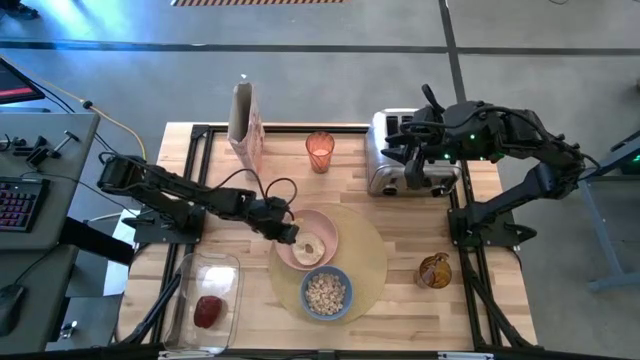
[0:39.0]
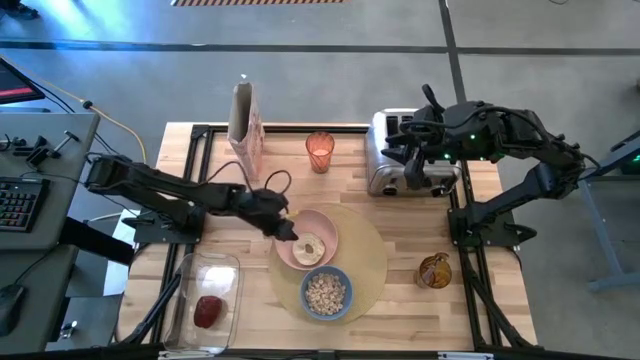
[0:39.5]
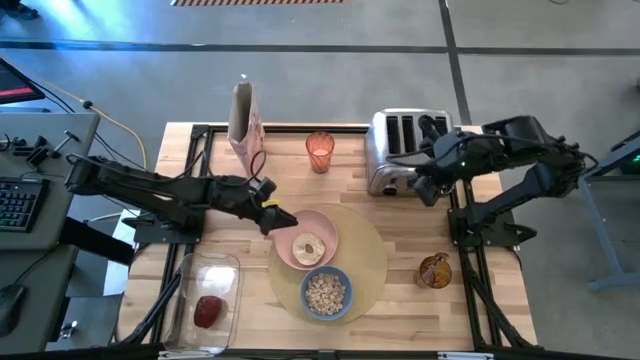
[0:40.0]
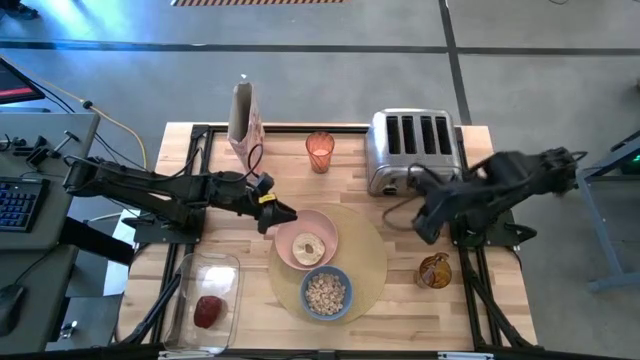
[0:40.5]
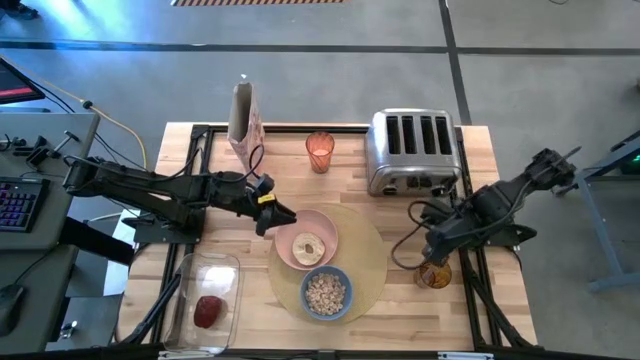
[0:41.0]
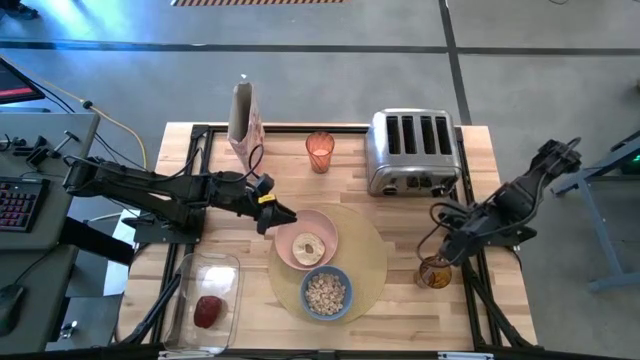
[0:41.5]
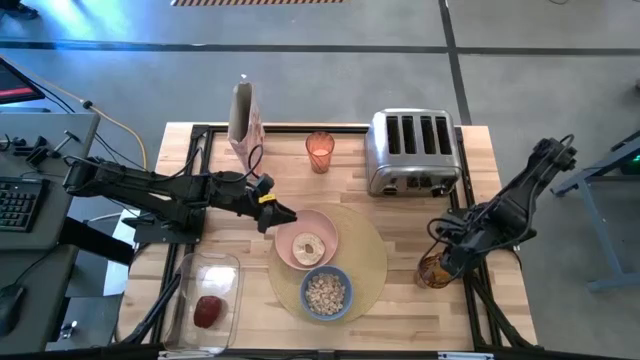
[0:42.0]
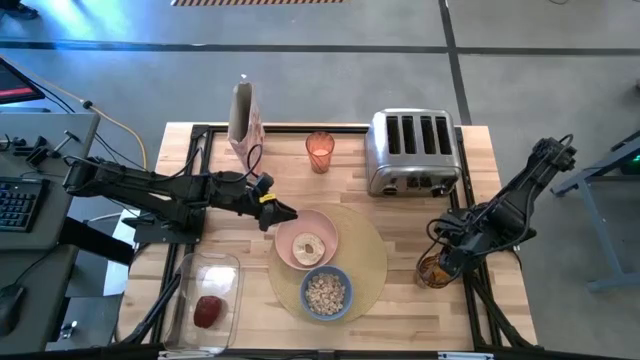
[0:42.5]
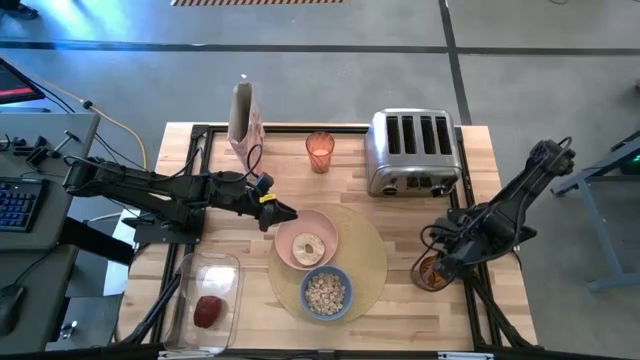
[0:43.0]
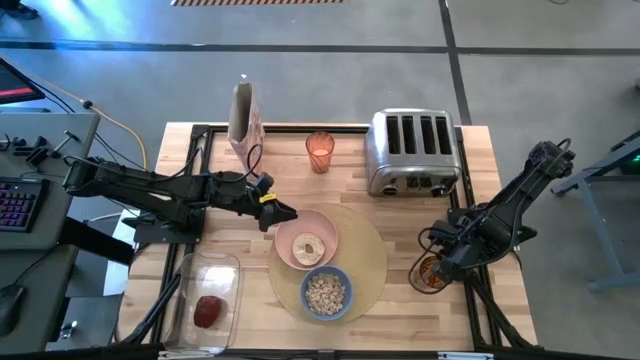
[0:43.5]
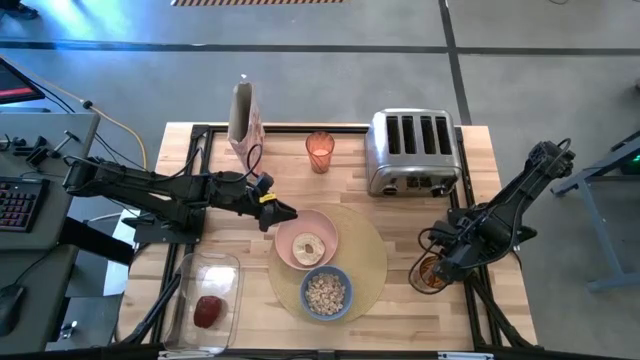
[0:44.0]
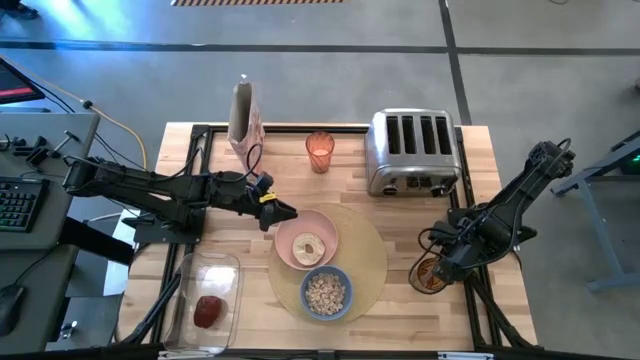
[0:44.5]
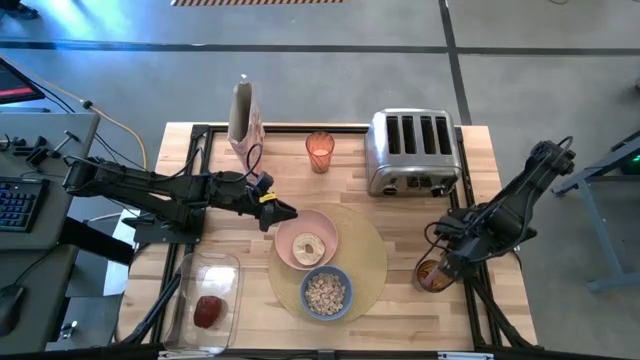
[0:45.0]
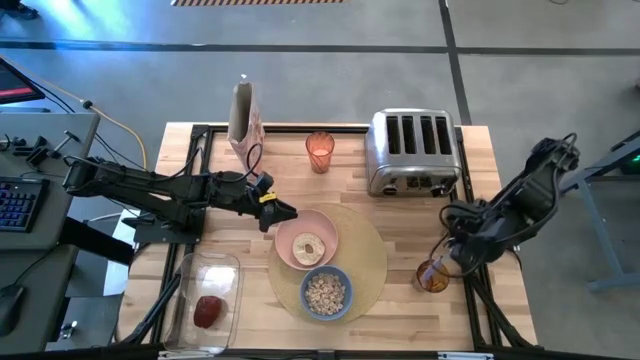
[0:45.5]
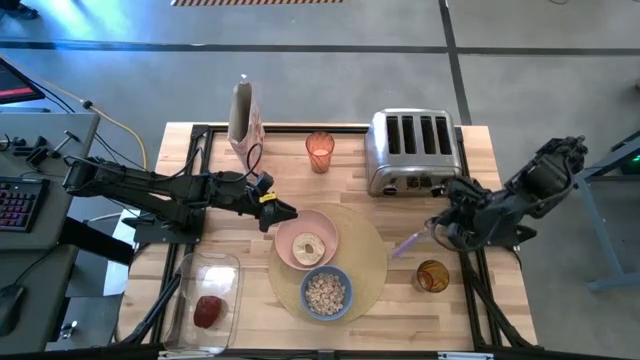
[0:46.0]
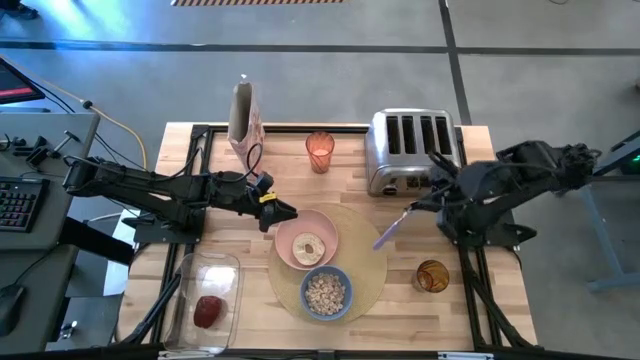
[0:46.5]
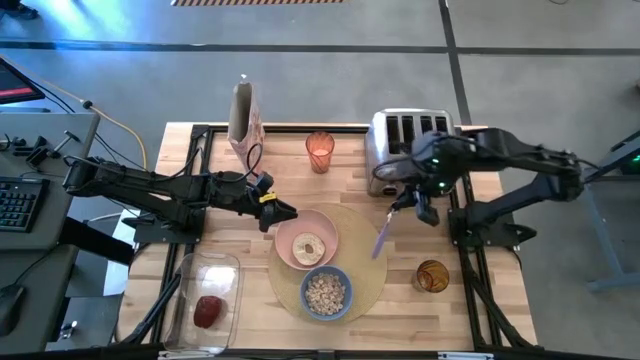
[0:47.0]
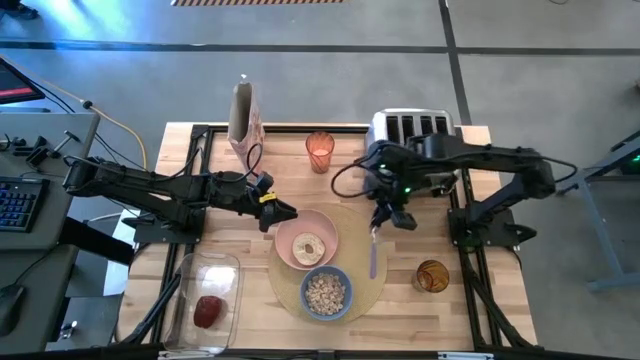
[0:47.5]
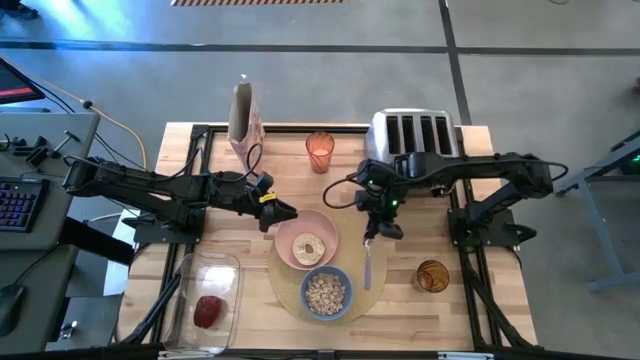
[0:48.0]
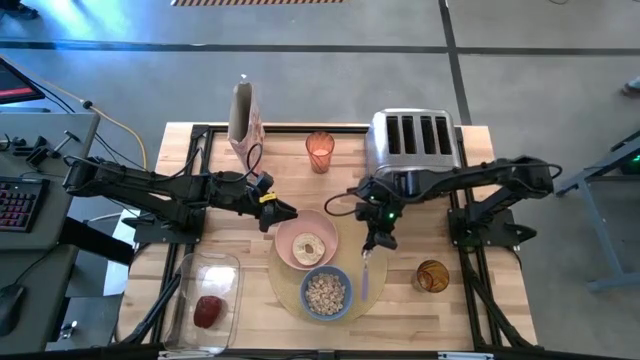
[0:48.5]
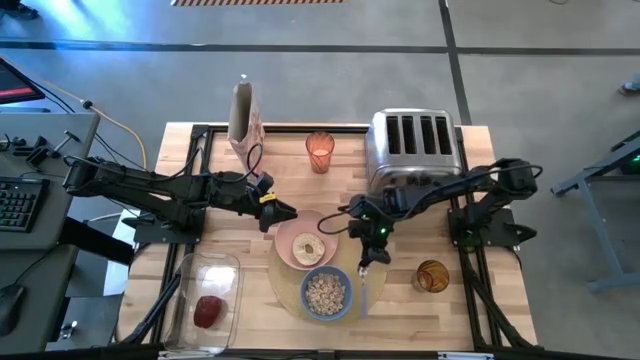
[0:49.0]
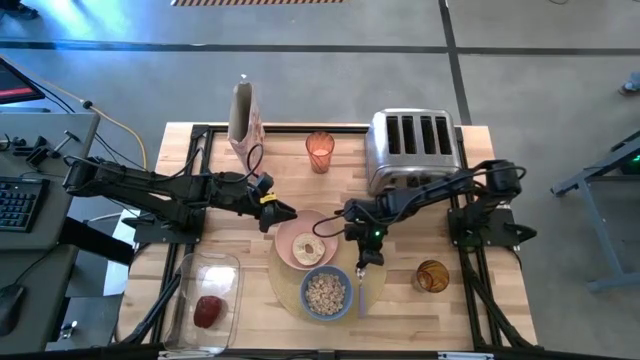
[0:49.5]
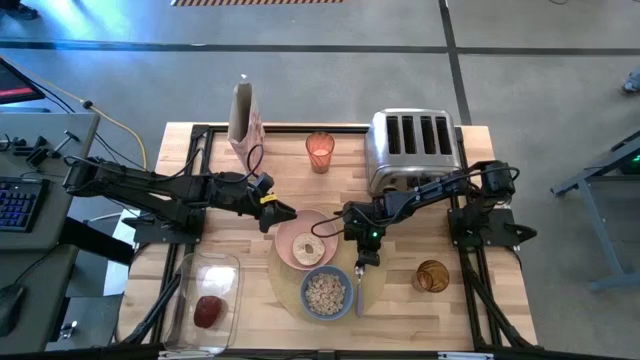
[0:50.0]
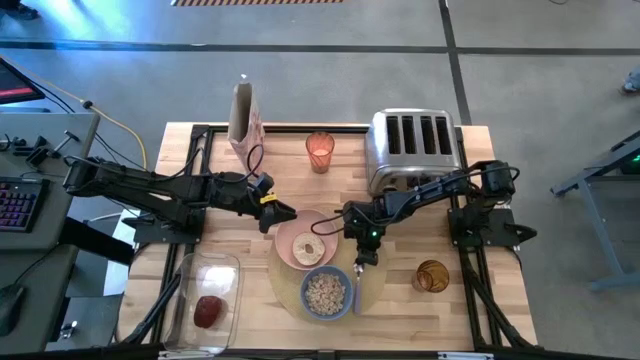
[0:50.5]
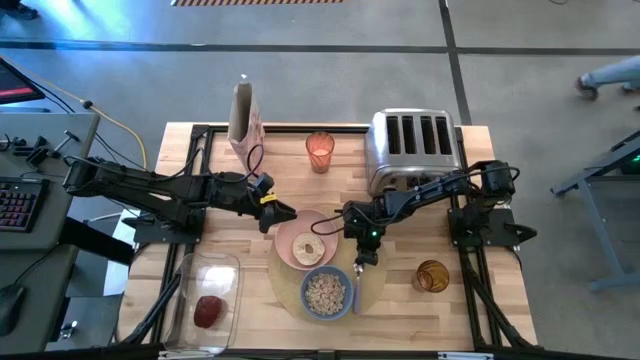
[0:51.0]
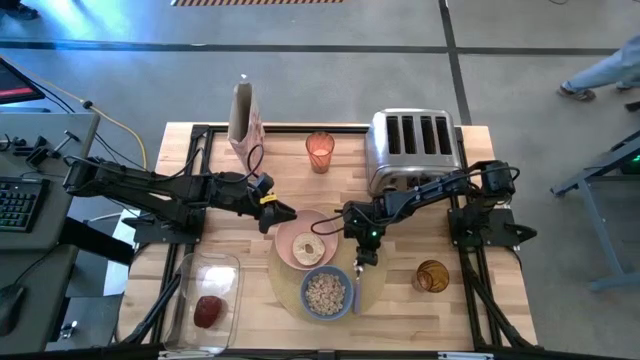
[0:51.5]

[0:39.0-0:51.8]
Task: Arrange a breakfast setting
Put the blue spoon onto the brown placemat to the right of the blue bowl

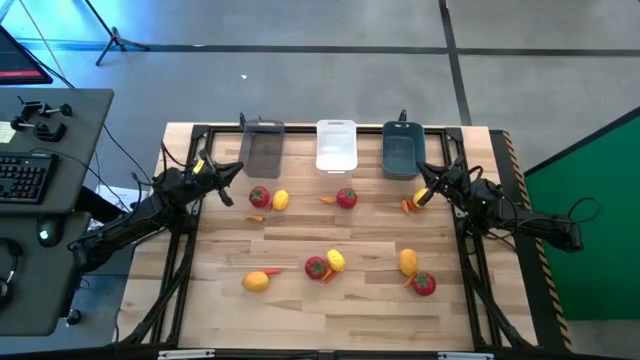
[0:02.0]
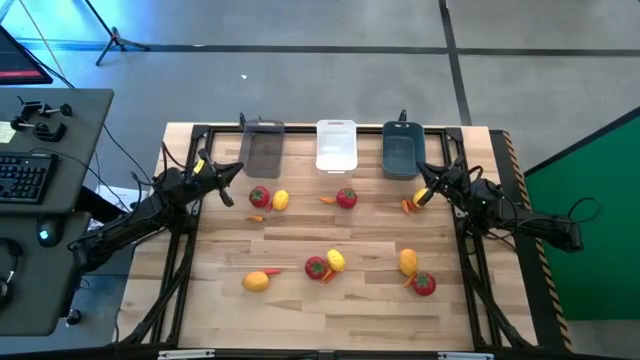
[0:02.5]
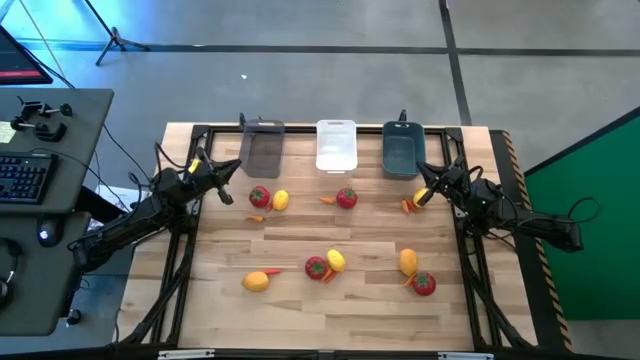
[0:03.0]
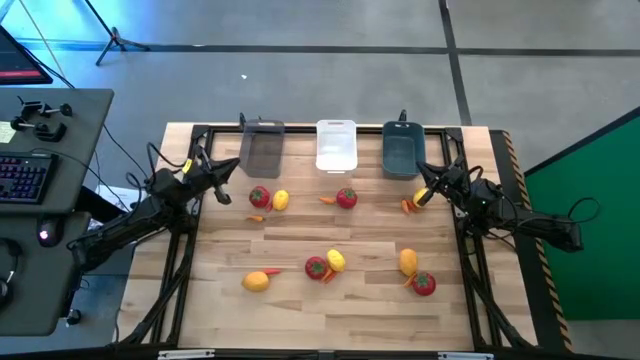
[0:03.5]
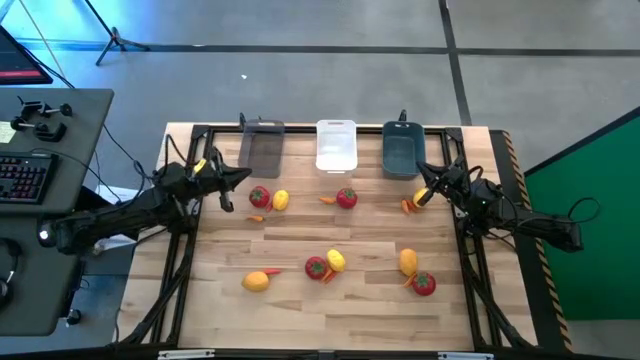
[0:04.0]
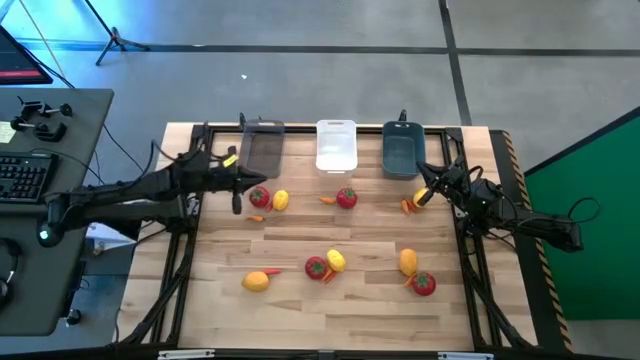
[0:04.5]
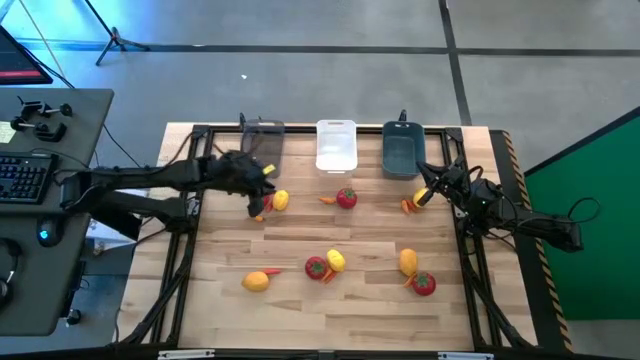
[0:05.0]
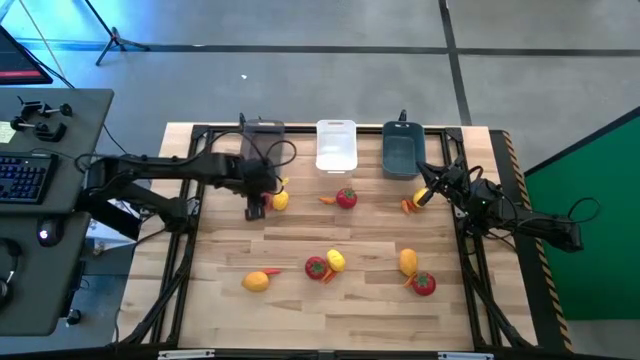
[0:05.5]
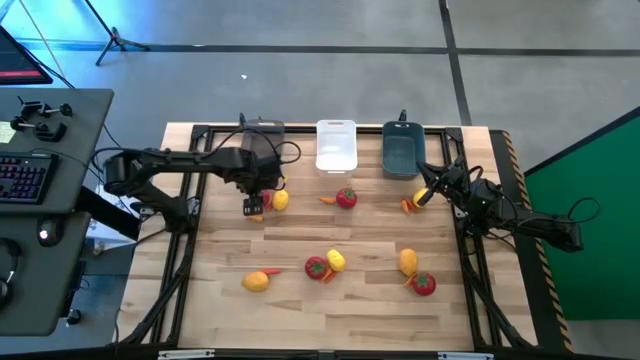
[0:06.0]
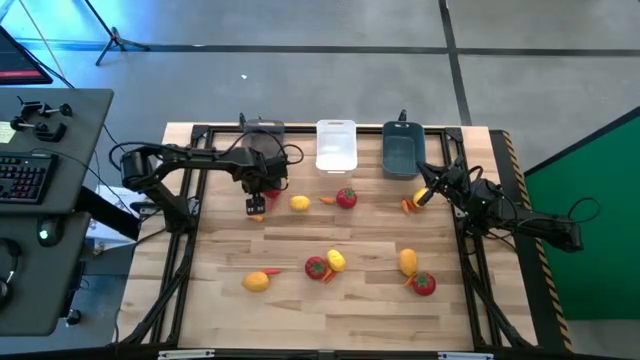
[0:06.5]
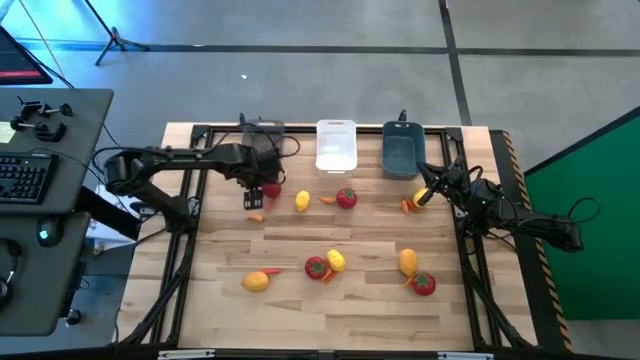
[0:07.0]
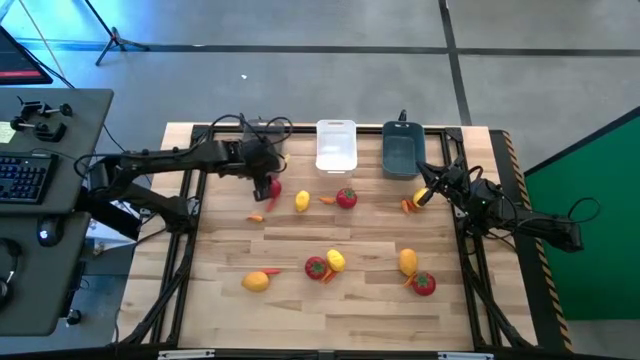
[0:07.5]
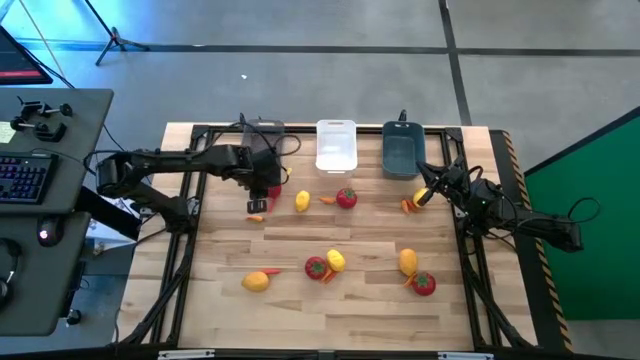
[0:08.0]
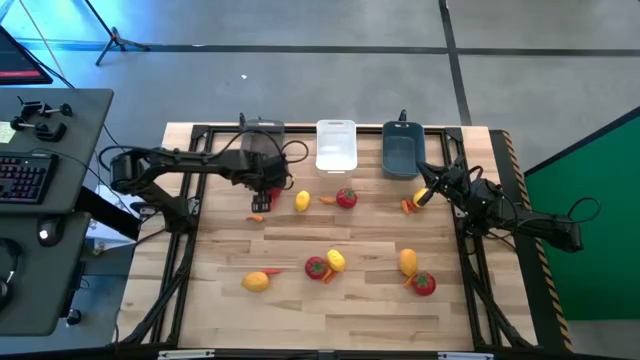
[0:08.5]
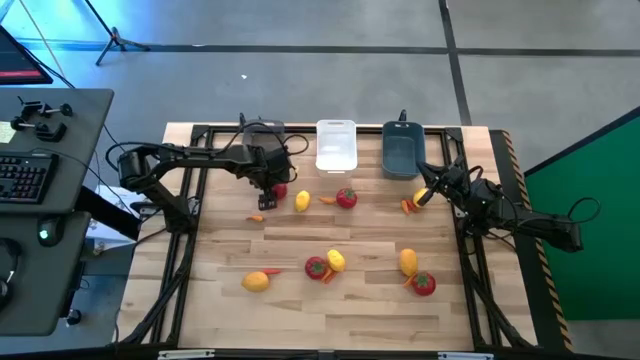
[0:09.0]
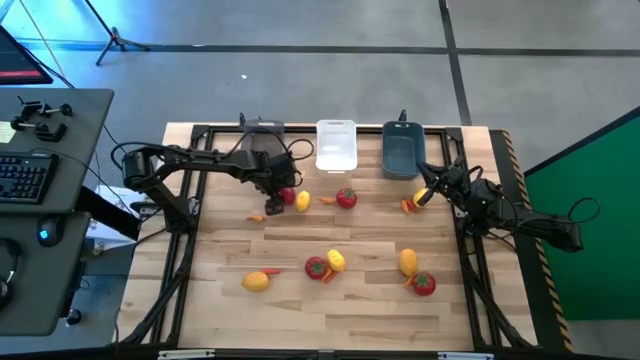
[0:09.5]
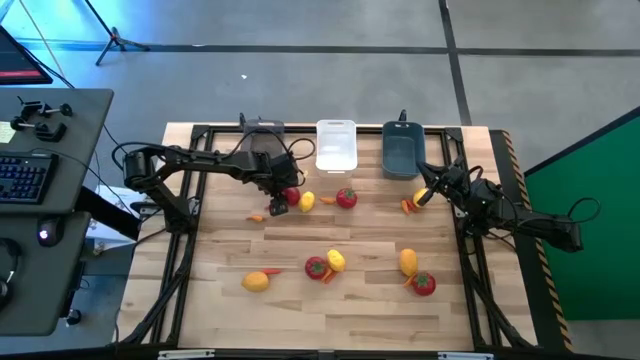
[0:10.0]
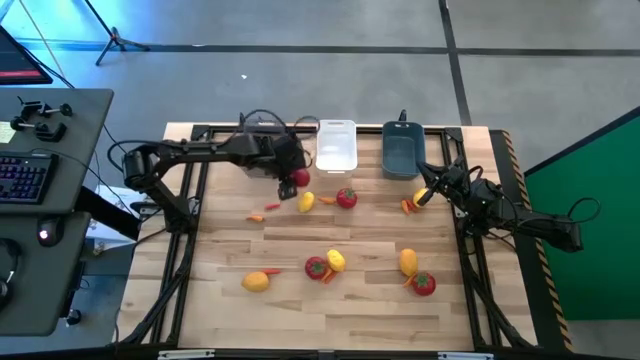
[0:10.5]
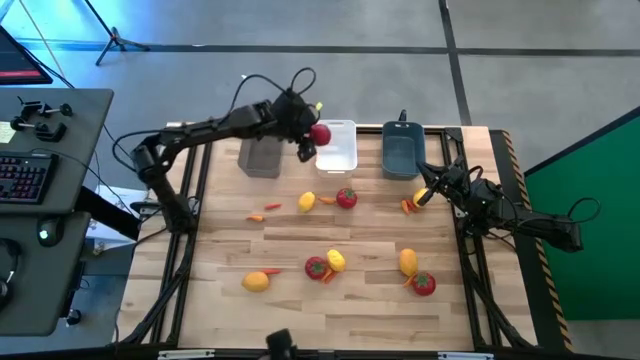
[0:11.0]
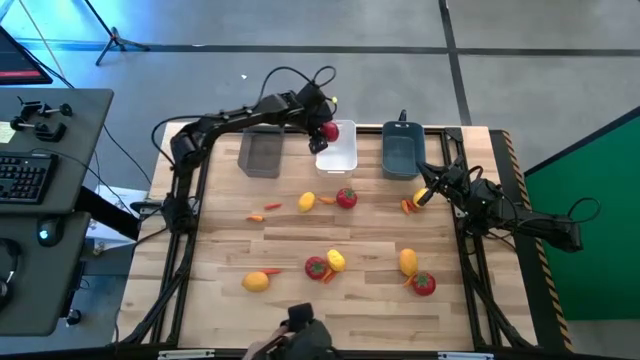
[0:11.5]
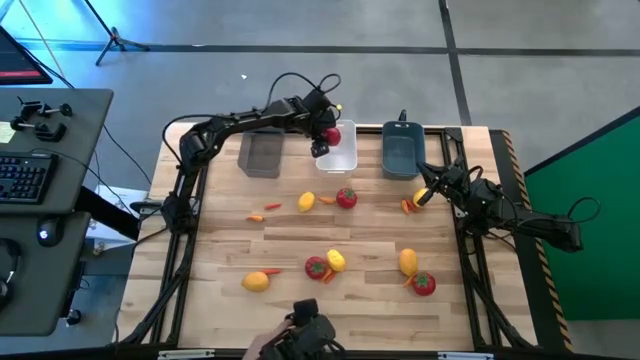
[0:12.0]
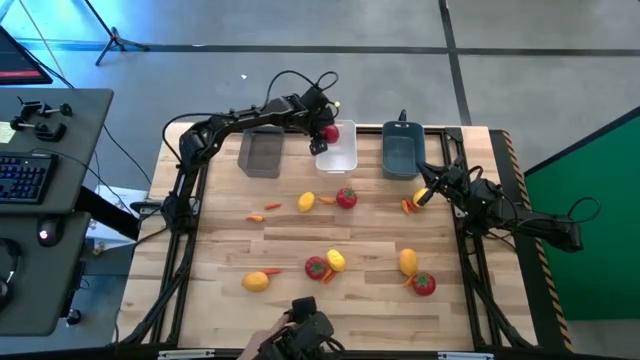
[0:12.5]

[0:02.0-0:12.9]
Task: Sort produce into baskets
Put the red tomato into the white bin
